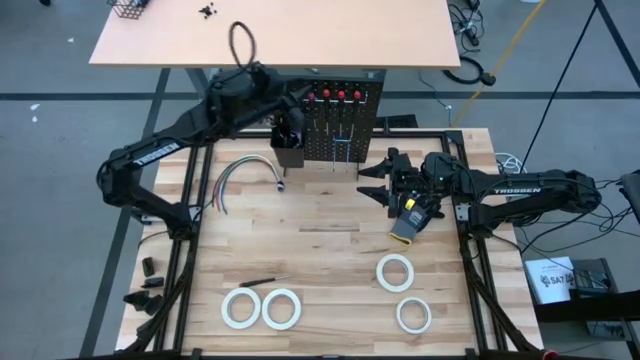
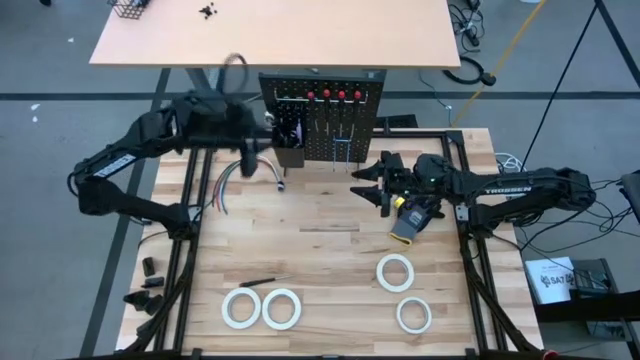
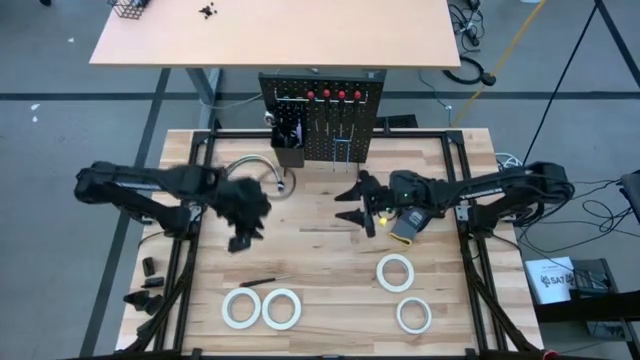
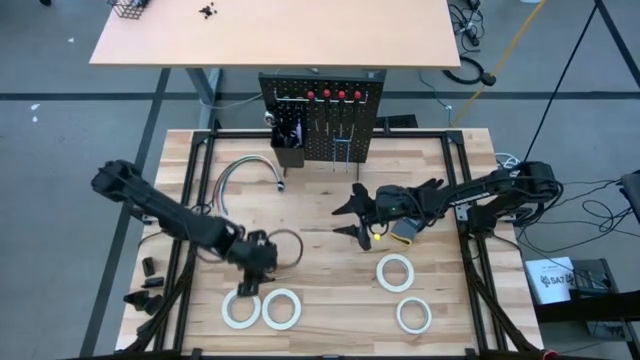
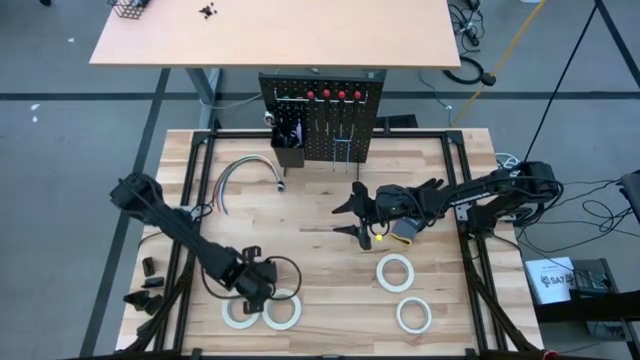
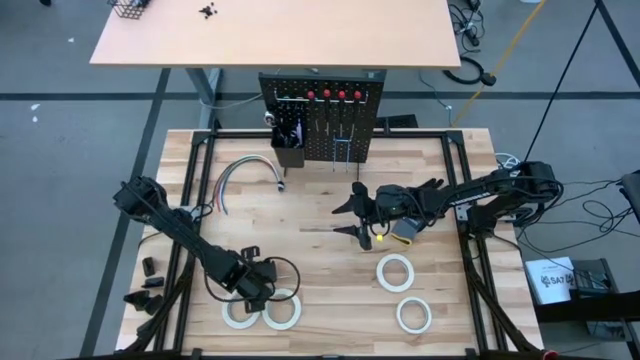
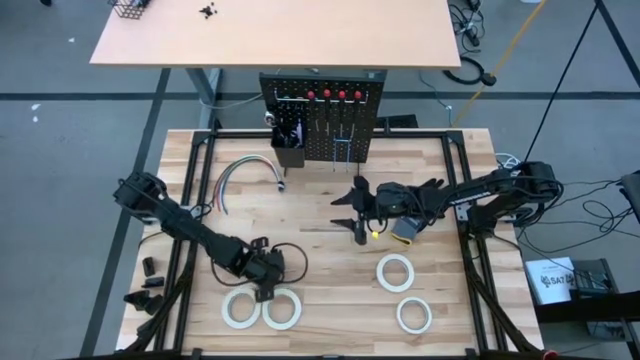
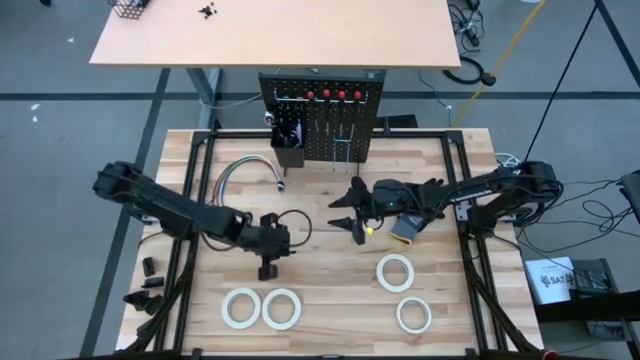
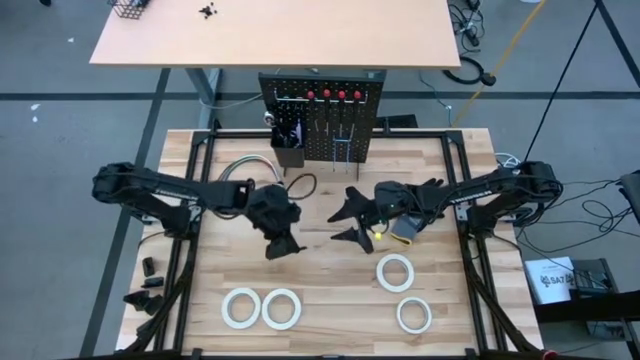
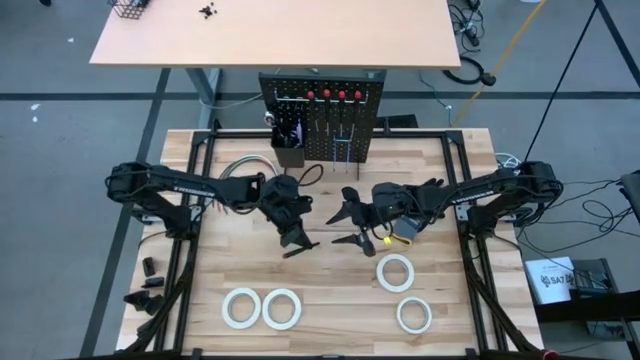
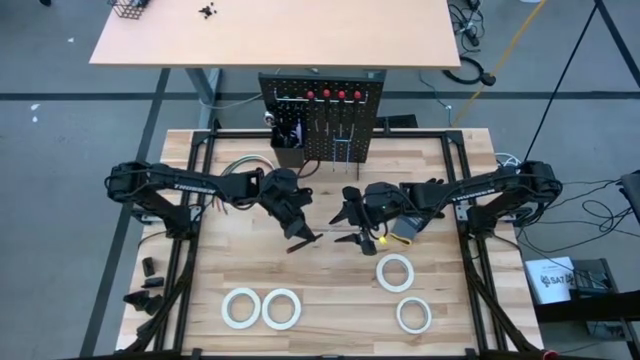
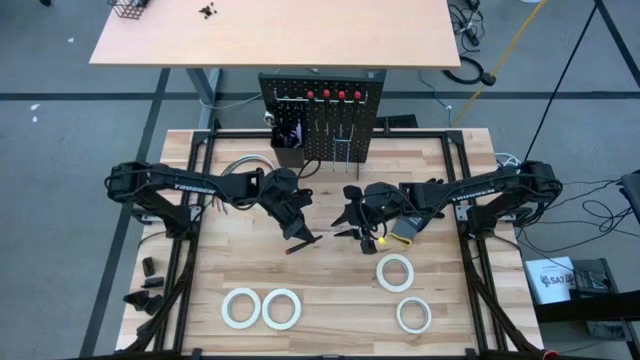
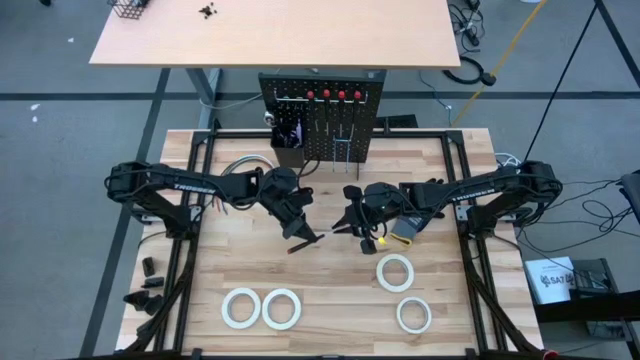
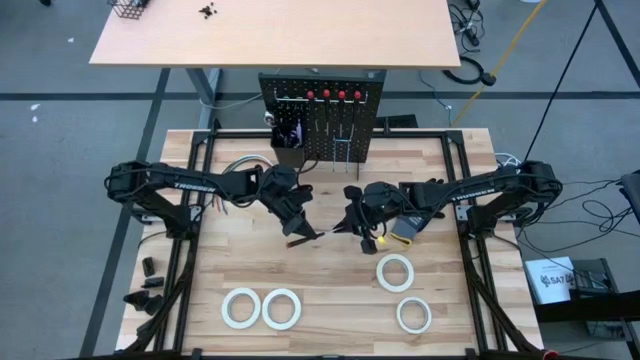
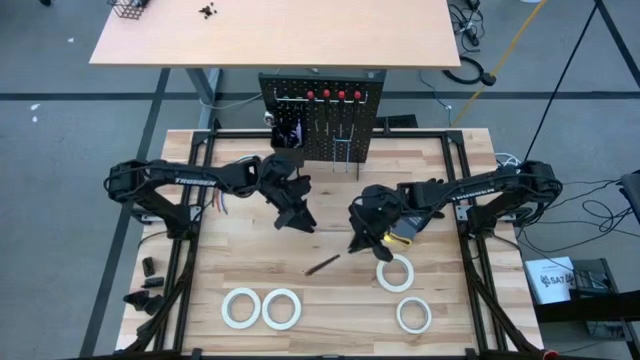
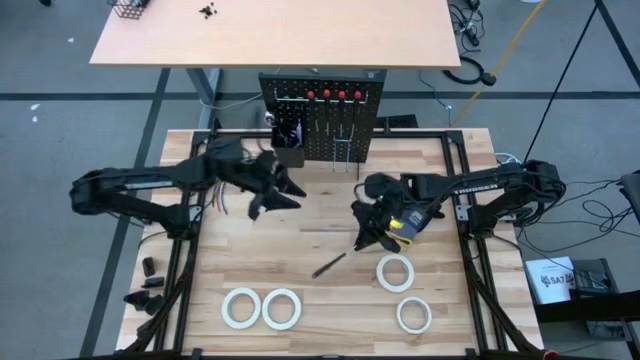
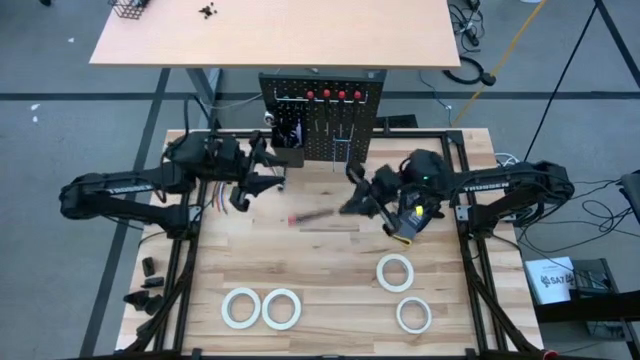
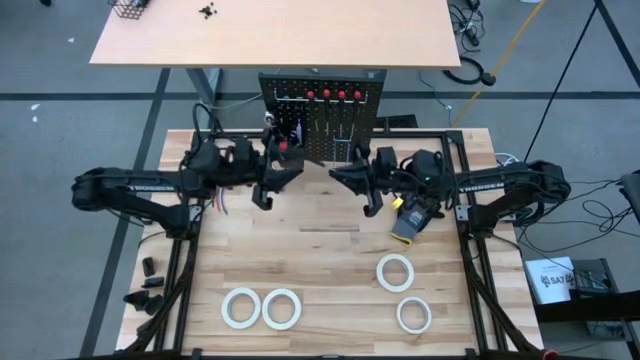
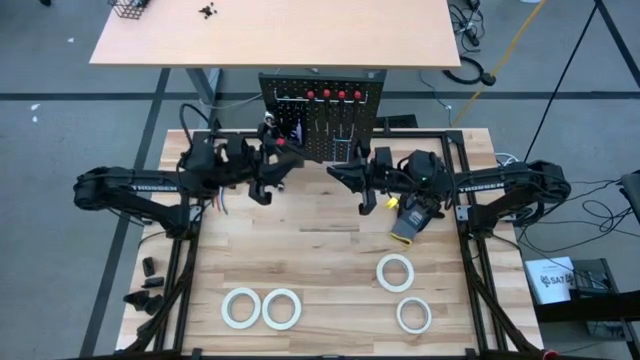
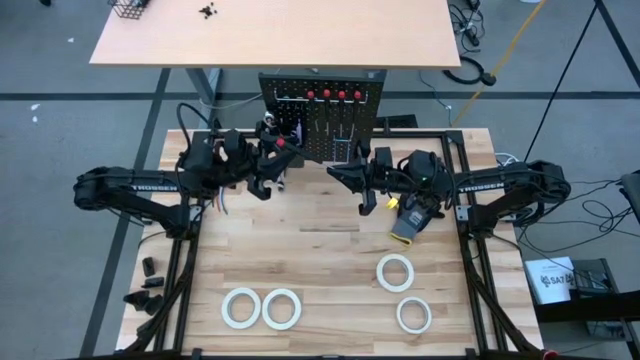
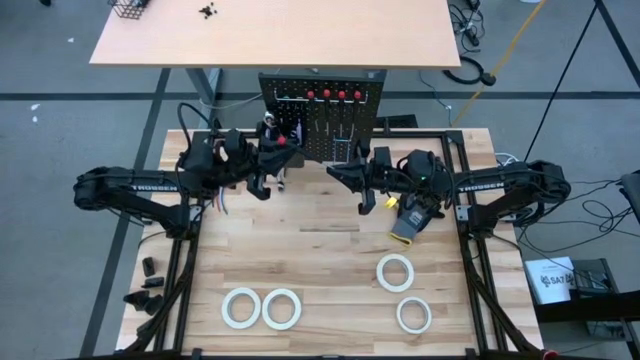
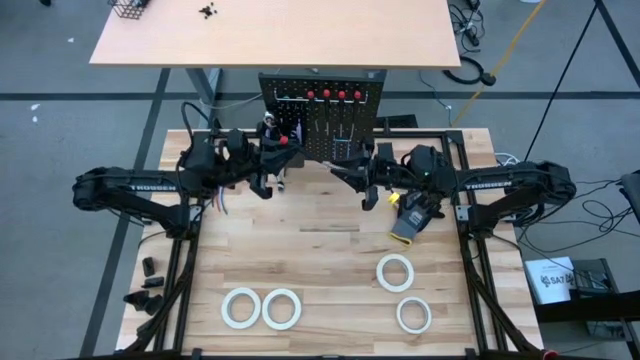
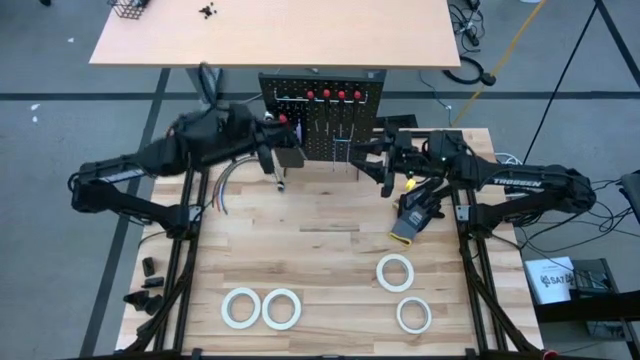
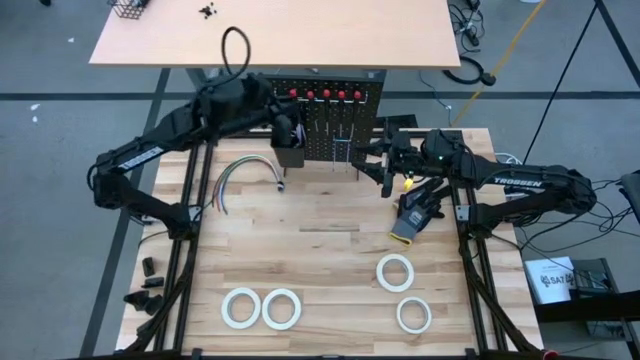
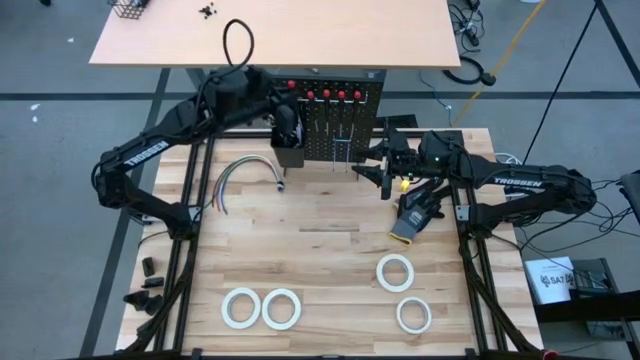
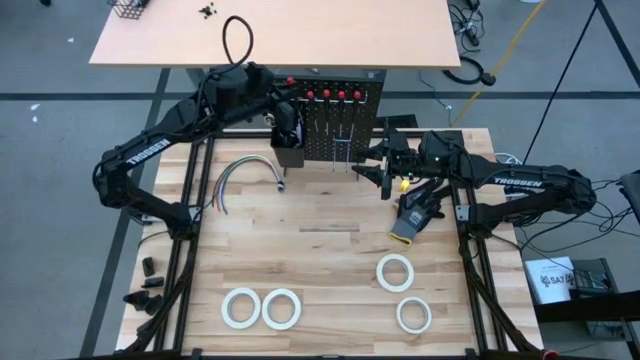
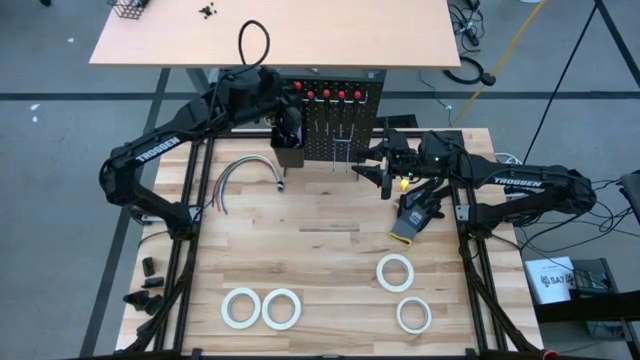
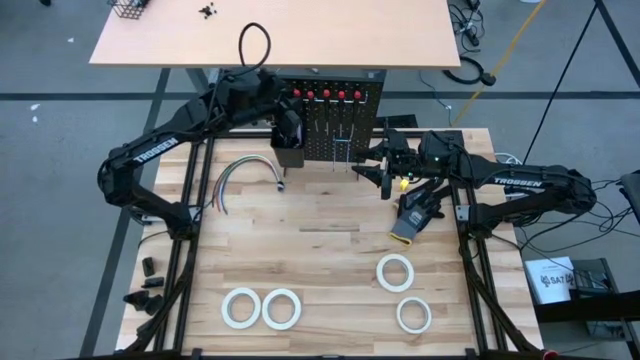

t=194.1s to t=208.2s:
Task: Hang tools onto peg board
Hang the nut driver on the peg board

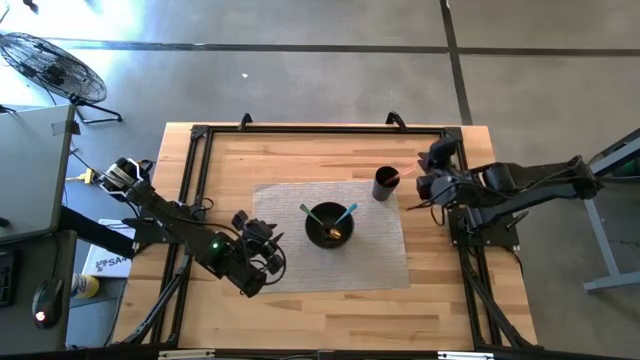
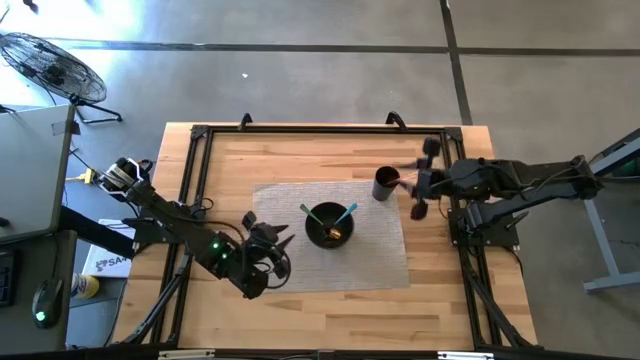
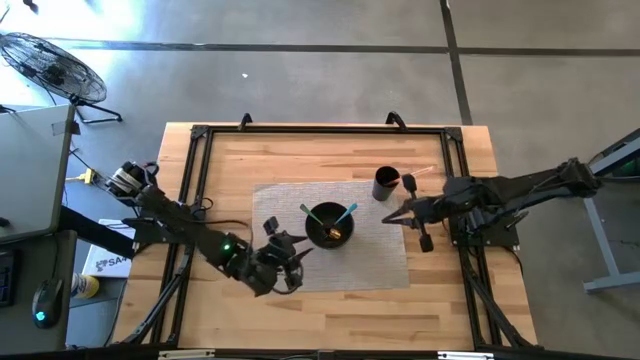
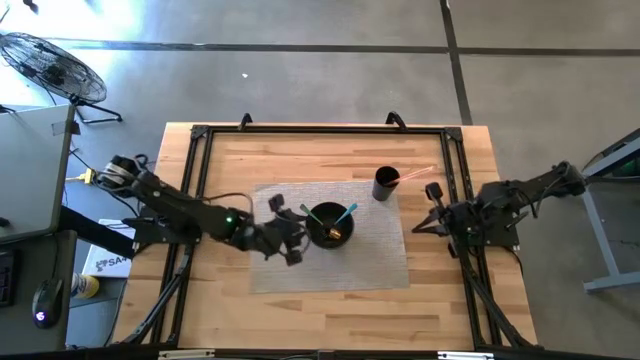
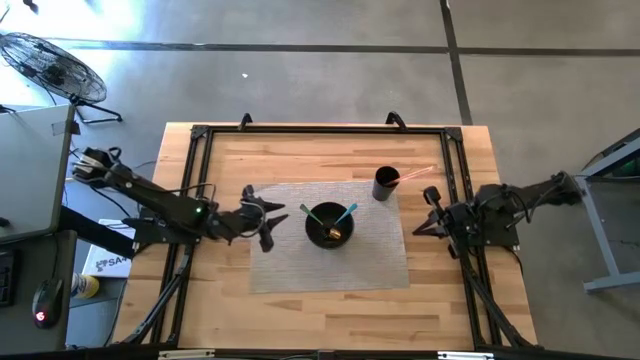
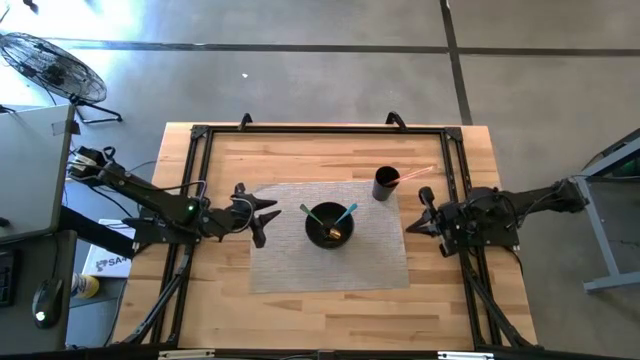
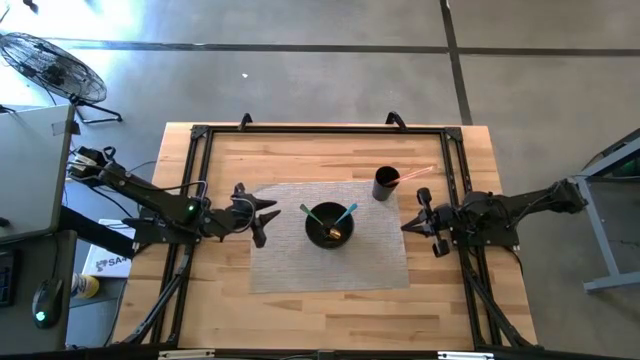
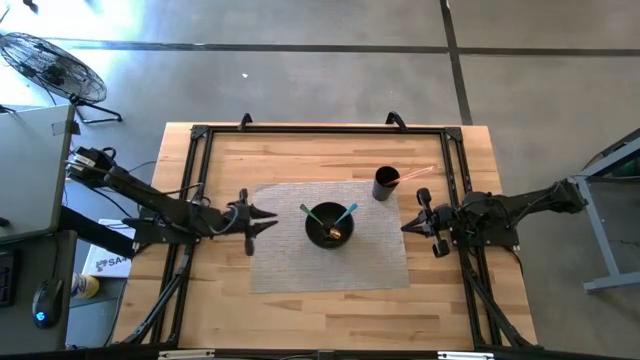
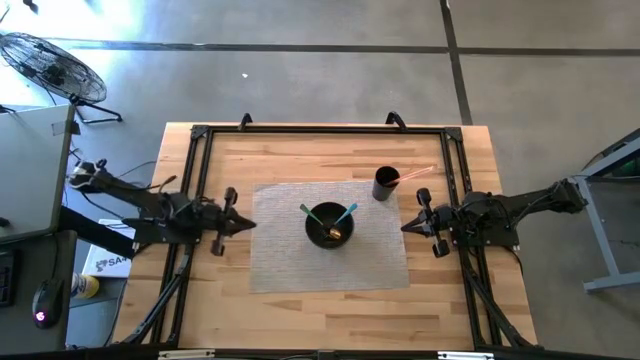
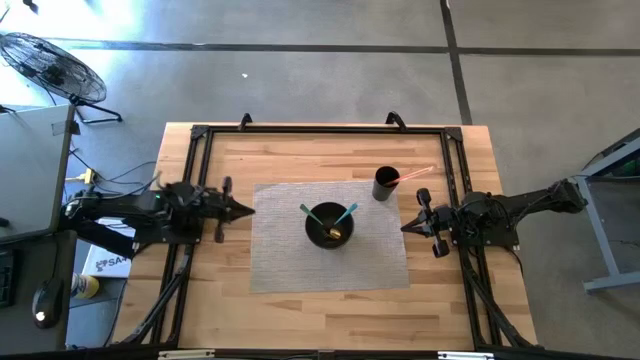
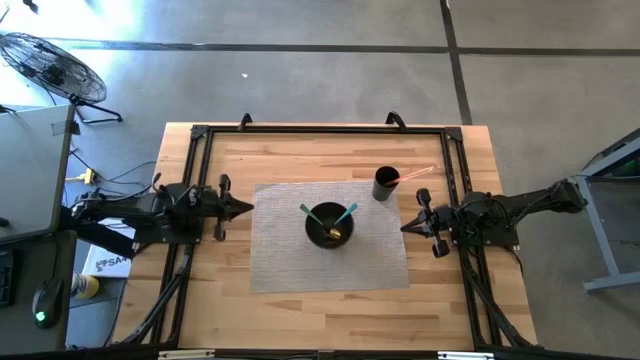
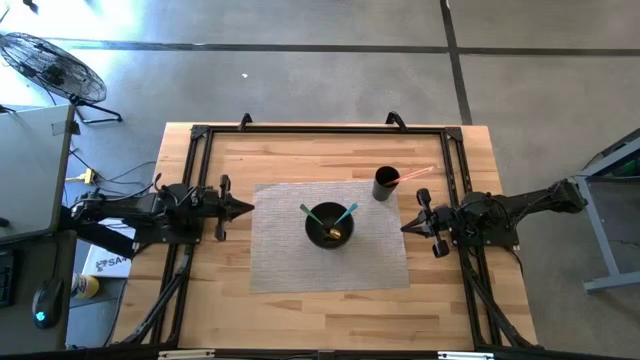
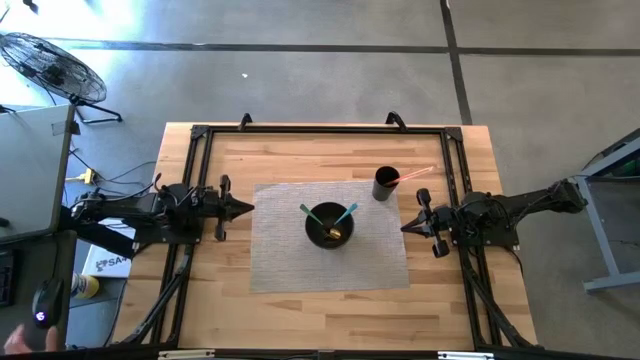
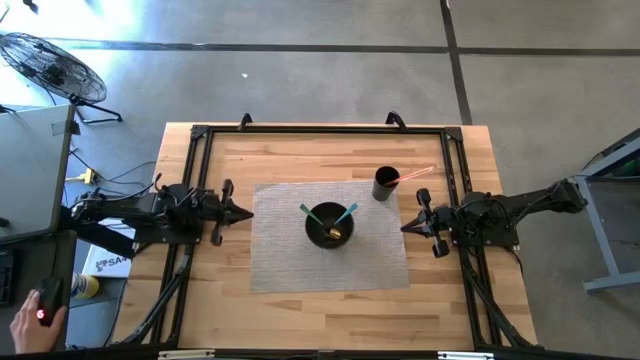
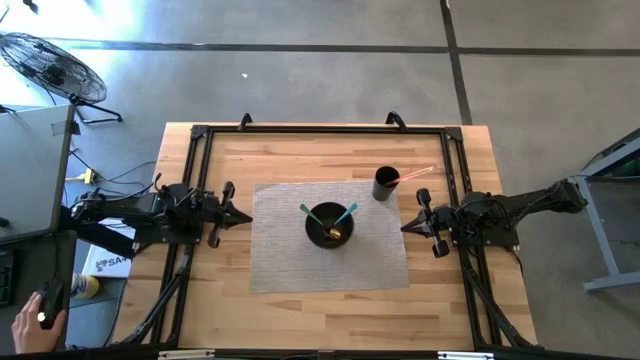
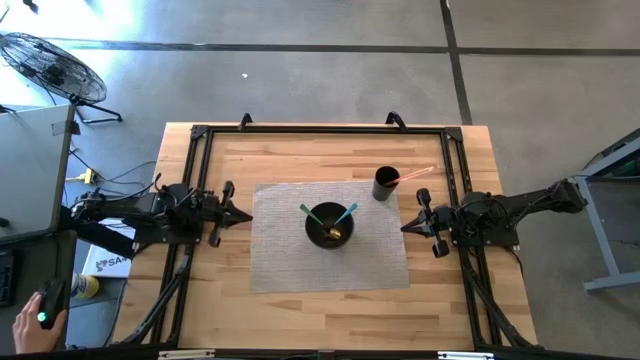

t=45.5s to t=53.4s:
Task: Pick & Place Utensil
Return to Home Position
